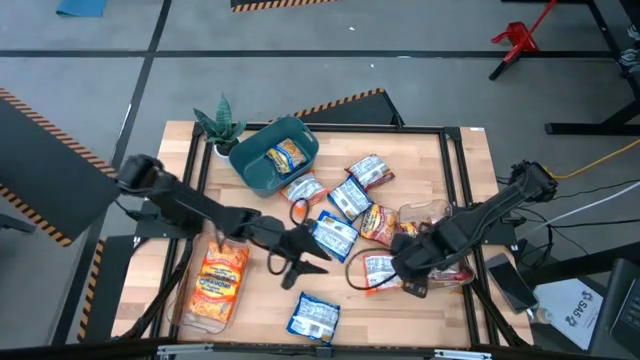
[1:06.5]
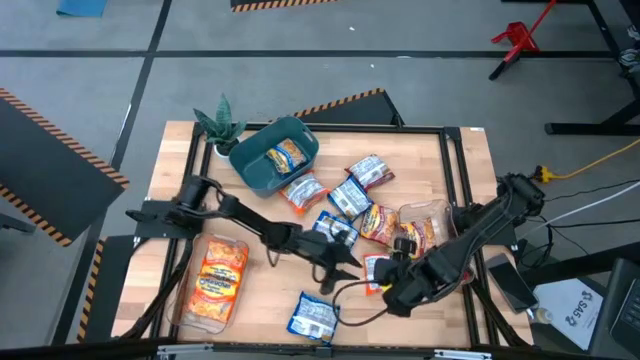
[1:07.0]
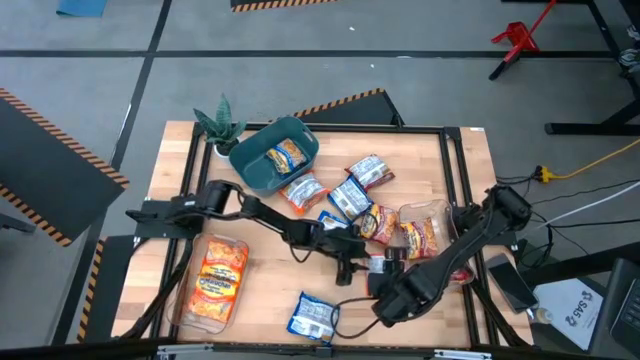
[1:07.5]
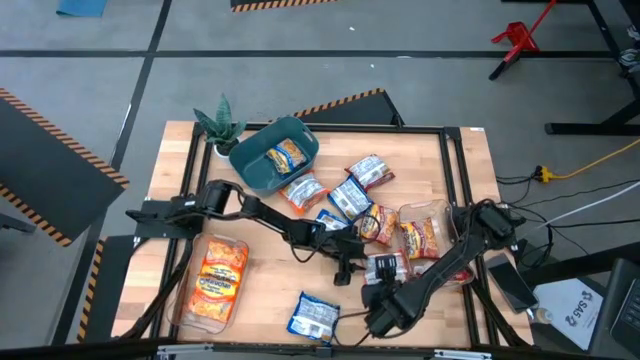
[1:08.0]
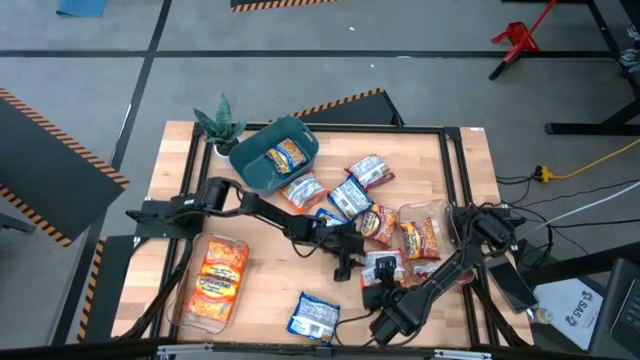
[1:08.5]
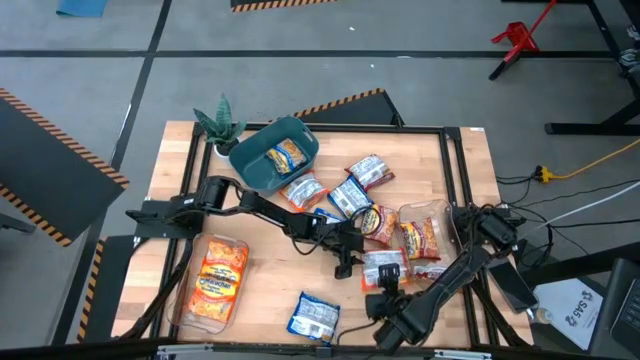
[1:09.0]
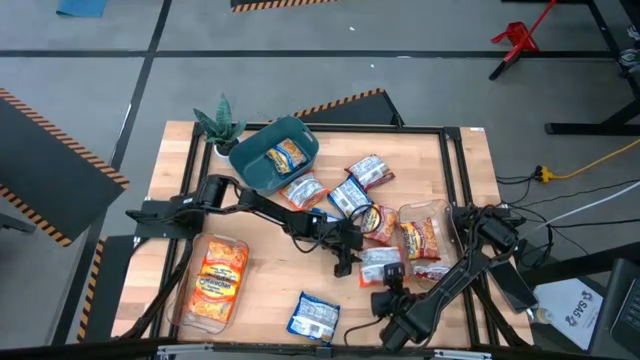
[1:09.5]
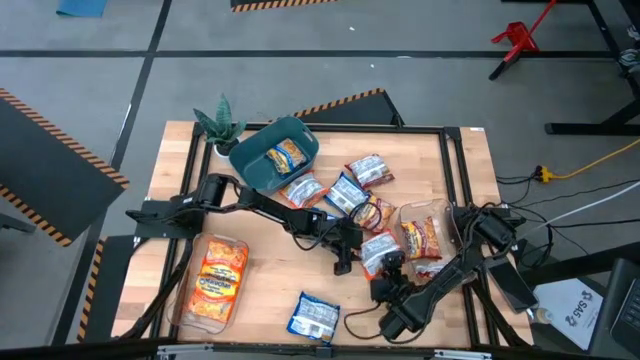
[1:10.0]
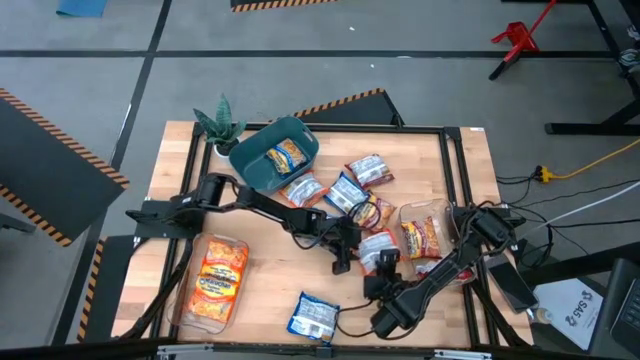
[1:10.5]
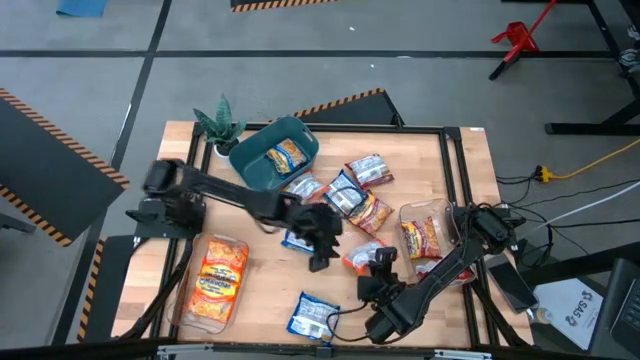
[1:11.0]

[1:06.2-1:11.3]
Task: Sort Maruchan noodles
Put the orange noodle pack into the left transparent bin

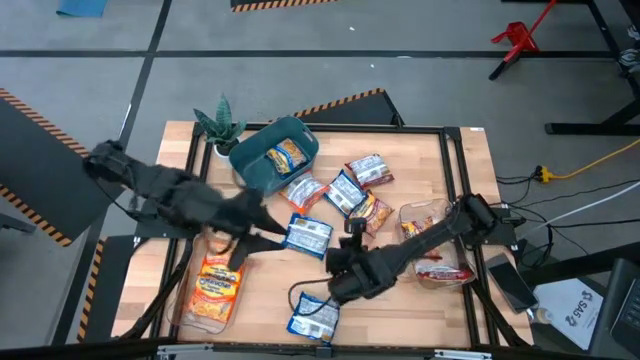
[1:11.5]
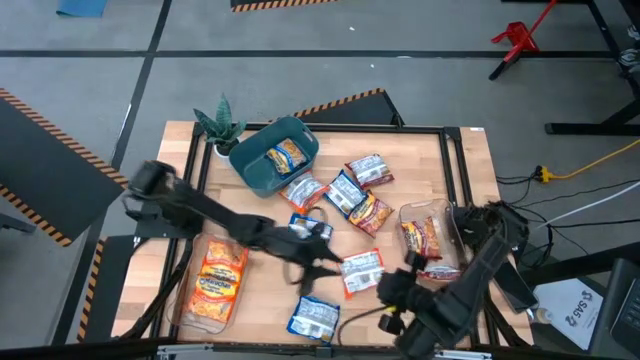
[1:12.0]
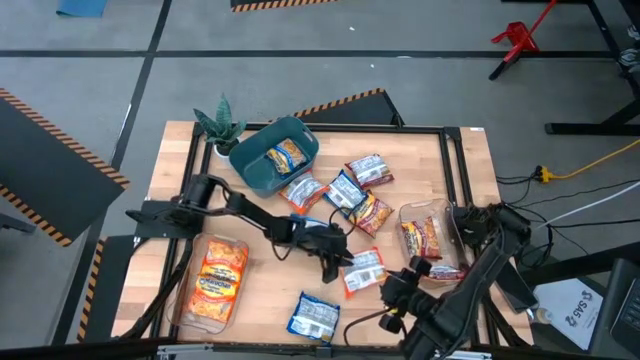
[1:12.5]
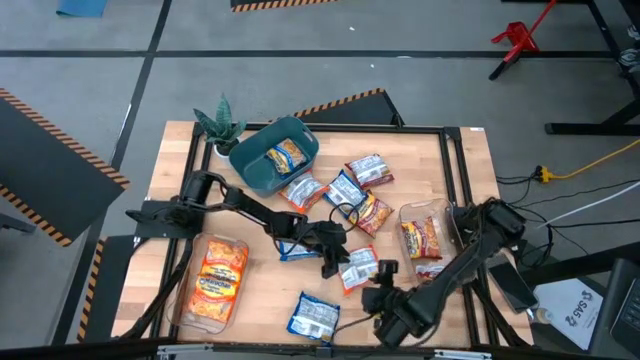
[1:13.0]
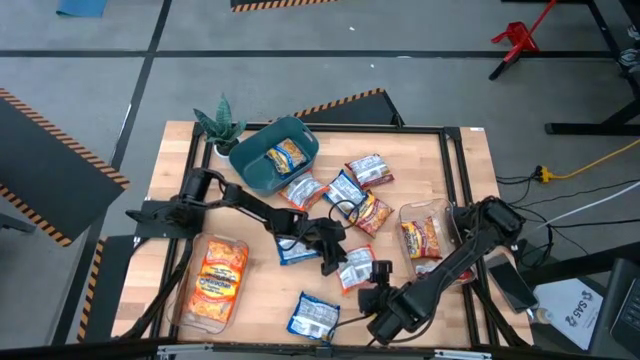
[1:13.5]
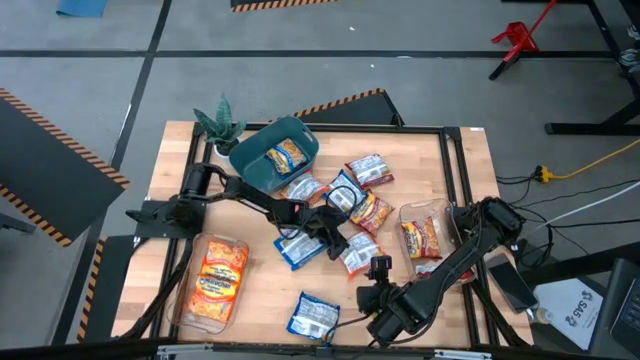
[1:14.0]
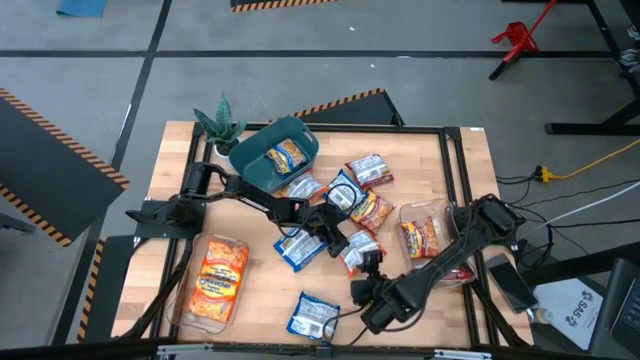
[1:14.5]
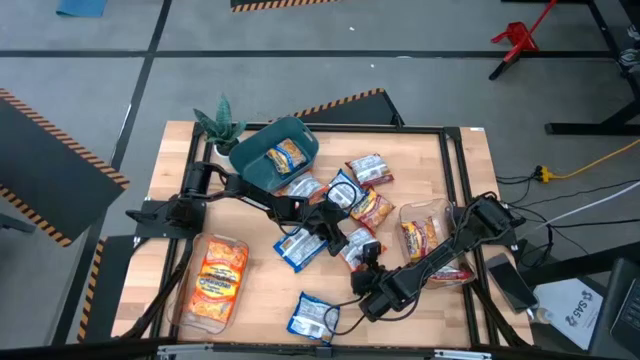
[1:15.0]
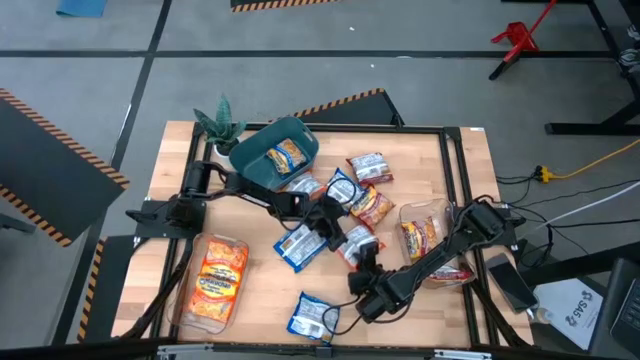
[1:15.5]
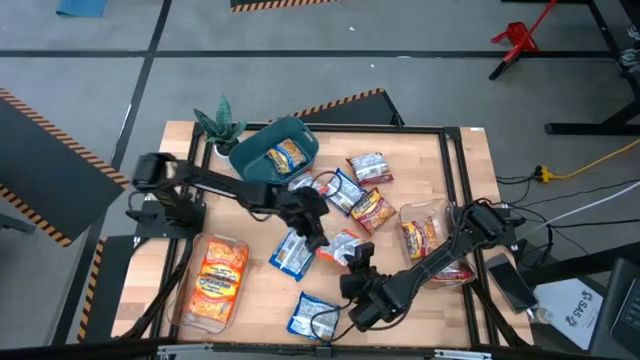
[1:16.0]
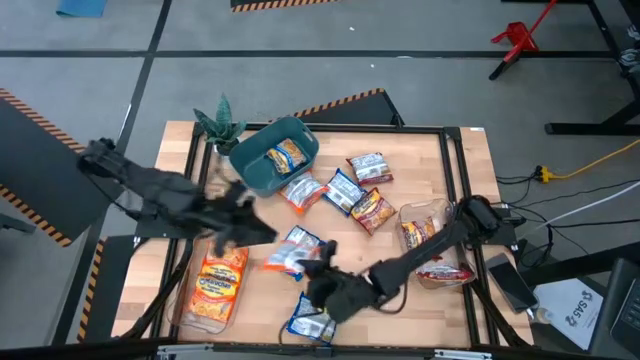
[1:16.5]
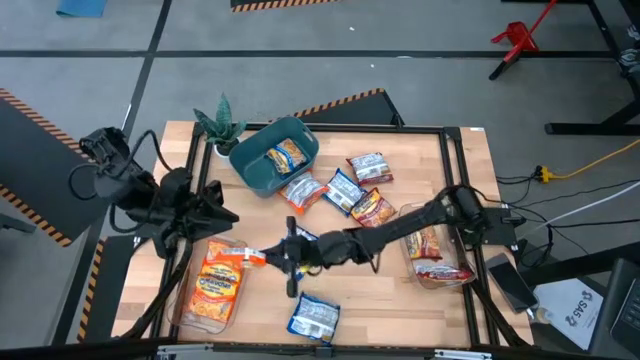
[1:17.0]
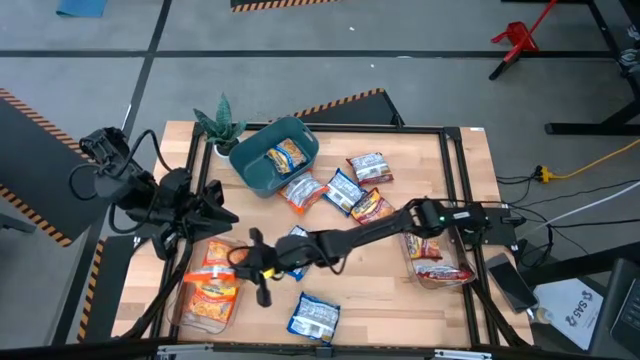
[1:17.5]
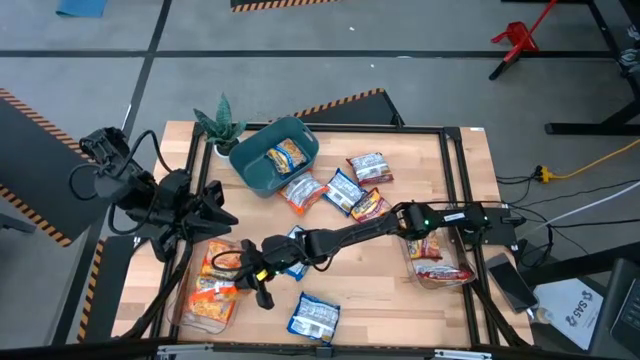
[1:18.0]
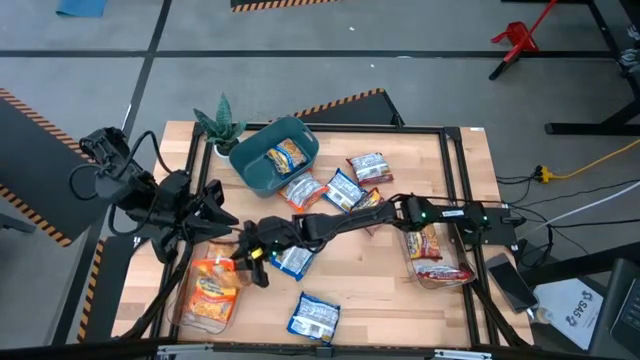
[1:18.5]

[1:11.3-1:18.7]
Put the orange noodle pack into the left transparent bin

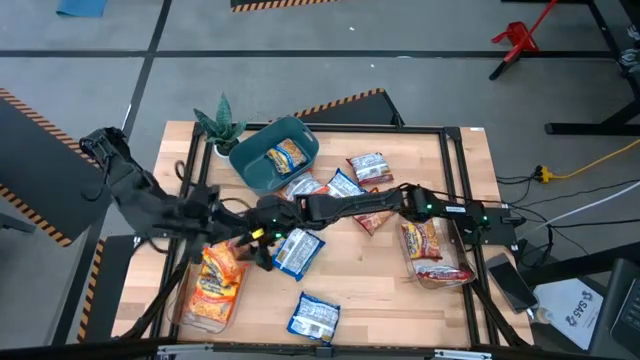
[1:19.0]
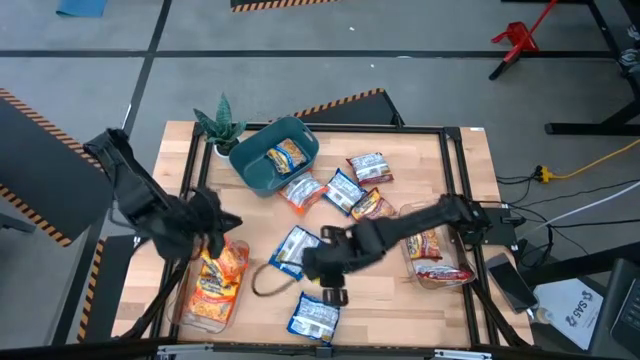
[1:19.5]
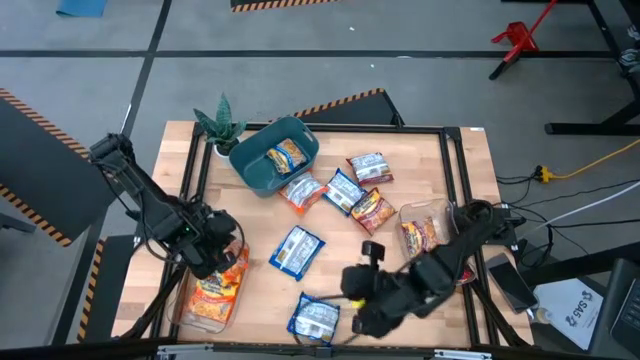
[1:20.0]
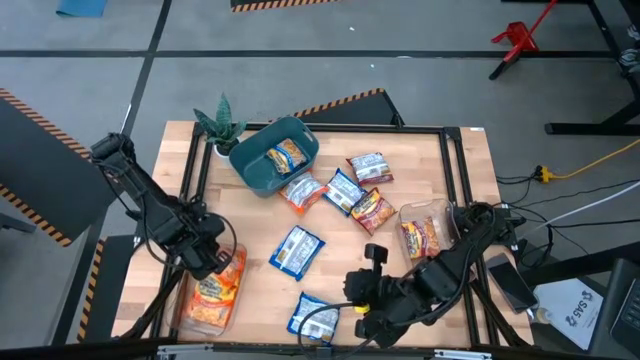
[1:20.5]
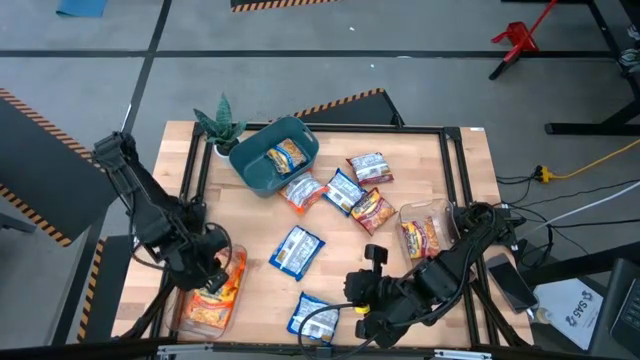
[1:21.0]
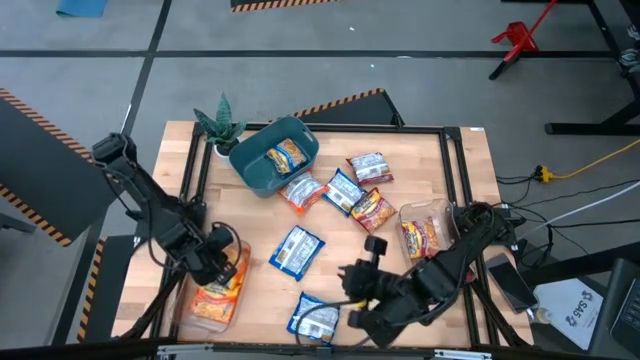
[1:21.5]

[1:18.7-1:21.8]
Adjust the orange noodle pack

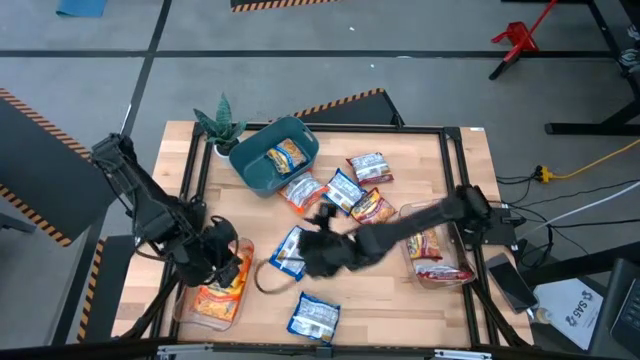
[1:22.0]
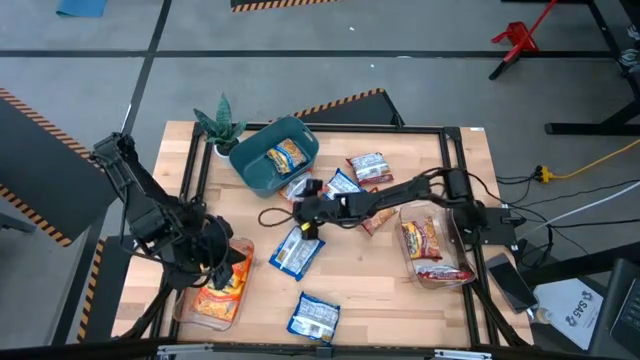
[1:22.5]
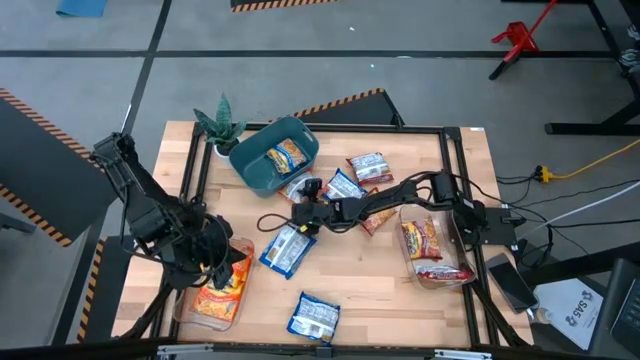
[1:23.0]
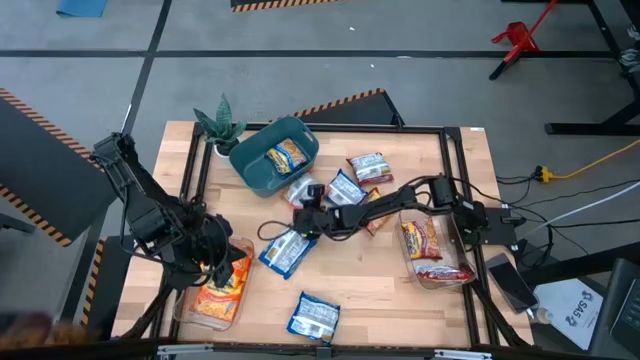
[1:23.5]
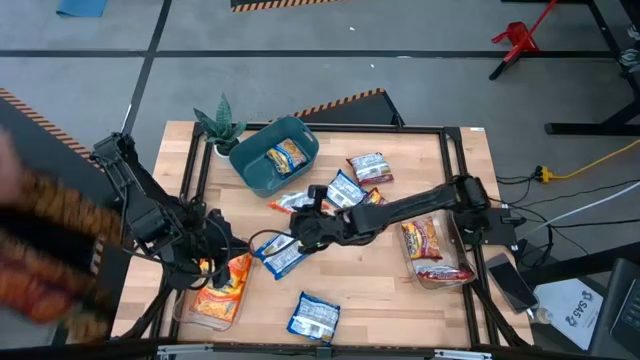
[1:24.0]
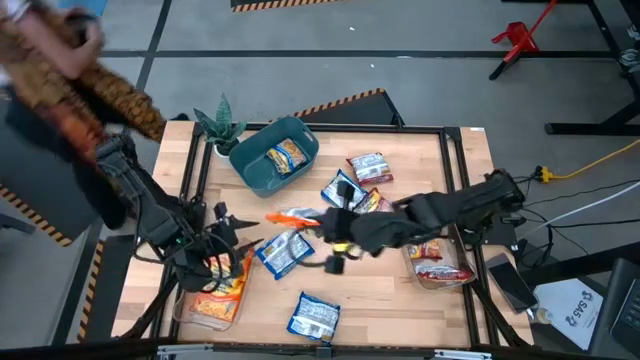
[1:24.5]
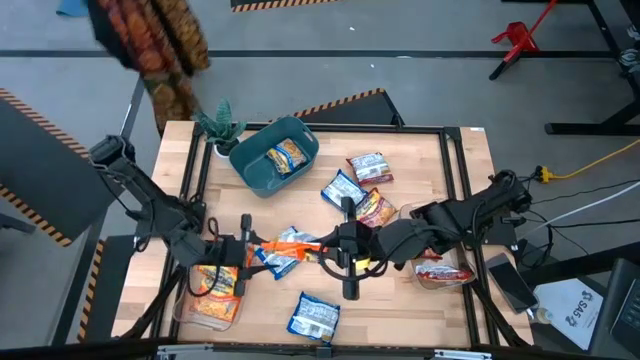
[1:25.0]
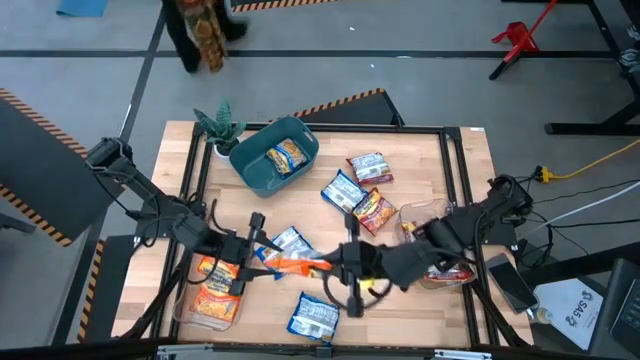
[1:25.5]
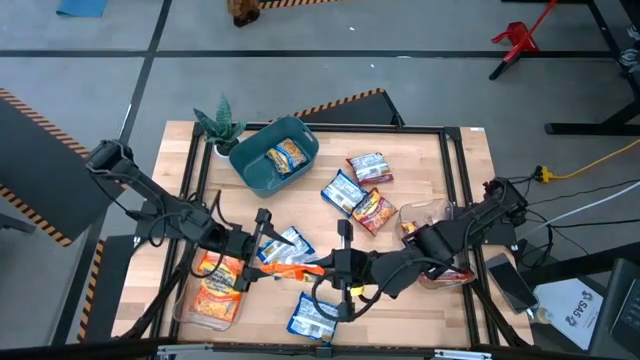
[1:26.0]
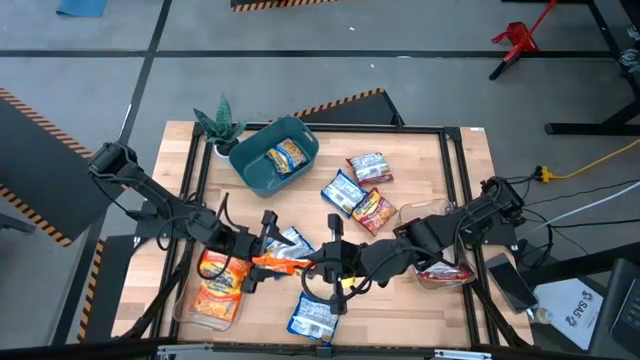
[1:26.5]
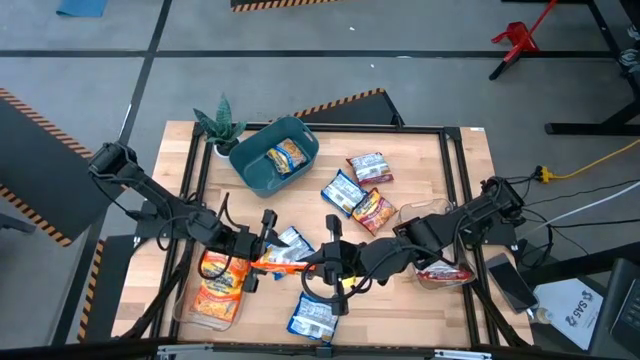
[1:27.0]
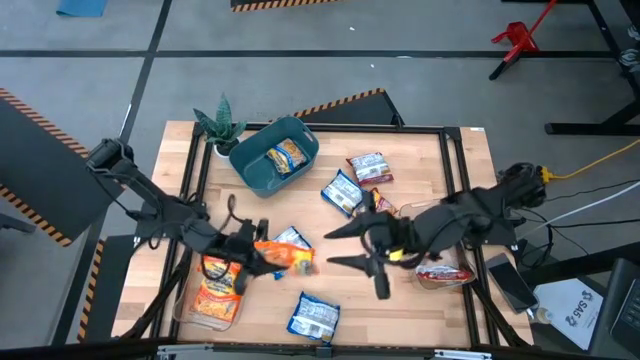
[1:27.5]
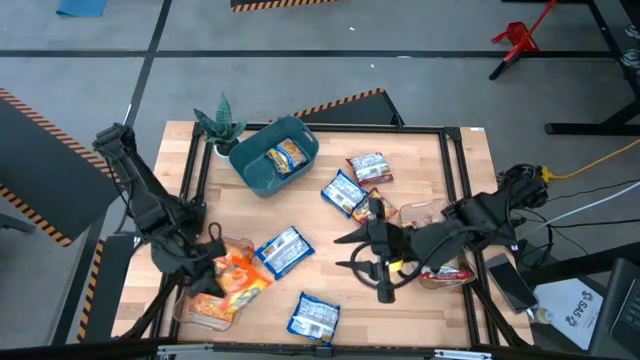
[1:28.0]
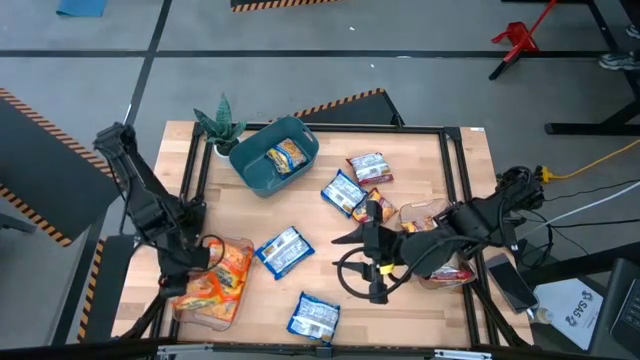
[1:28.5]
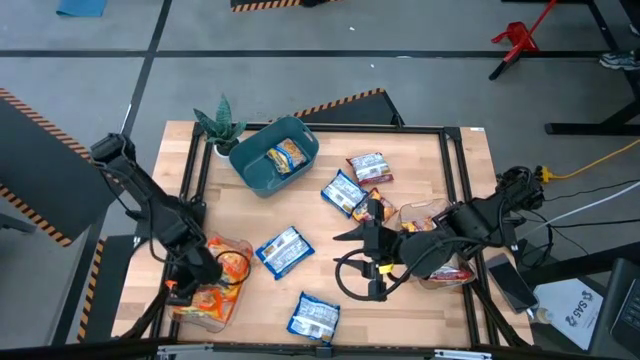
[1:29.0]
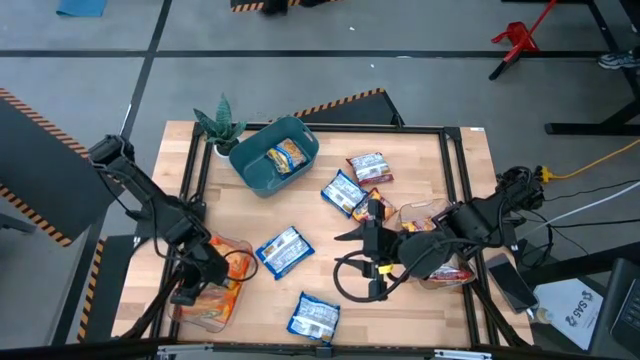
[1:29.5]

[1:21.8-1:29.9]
Put the orange noodle pack into the left transparent bin
